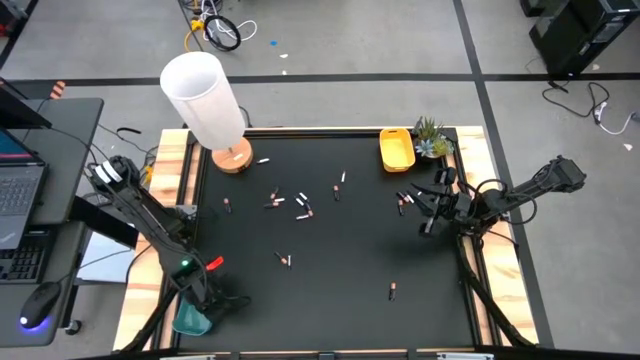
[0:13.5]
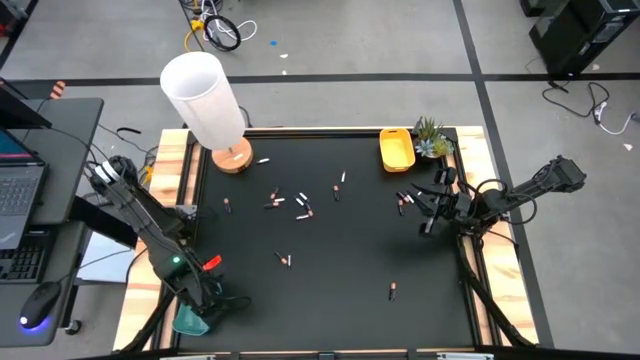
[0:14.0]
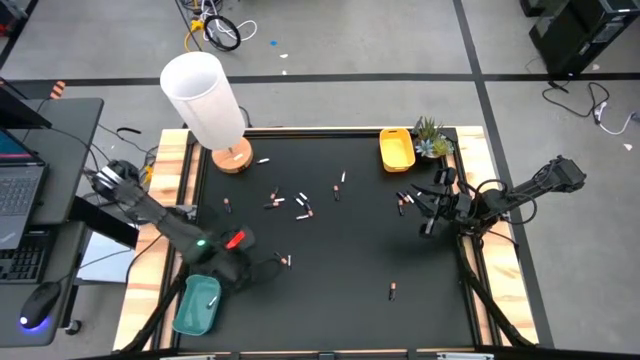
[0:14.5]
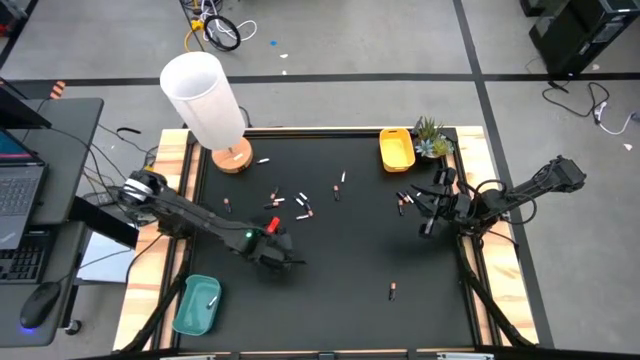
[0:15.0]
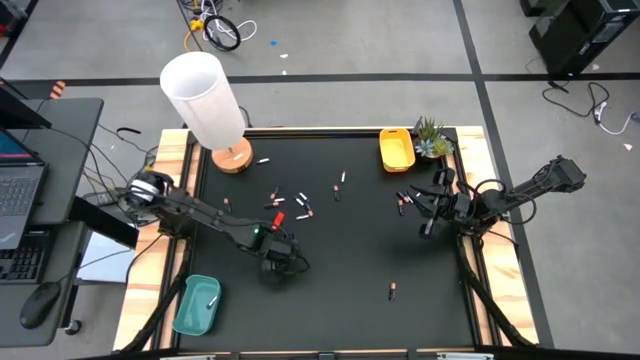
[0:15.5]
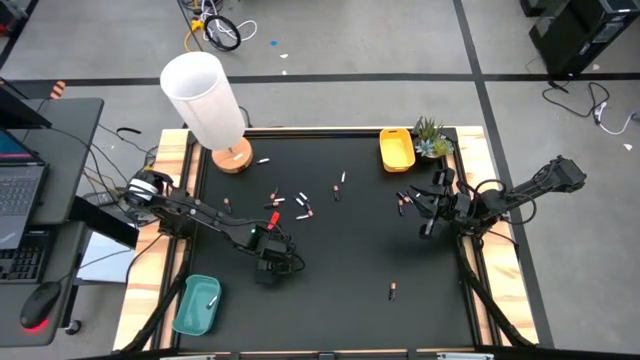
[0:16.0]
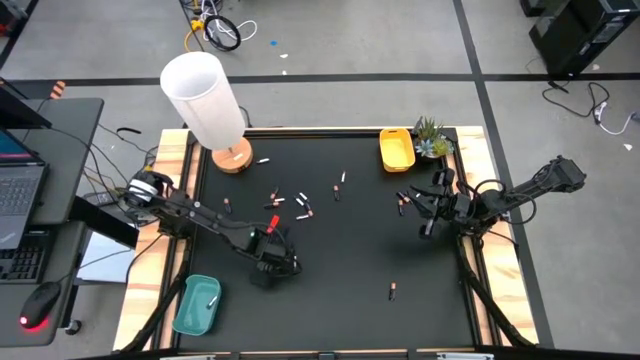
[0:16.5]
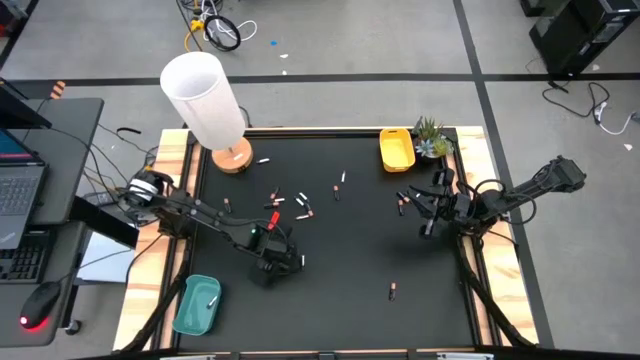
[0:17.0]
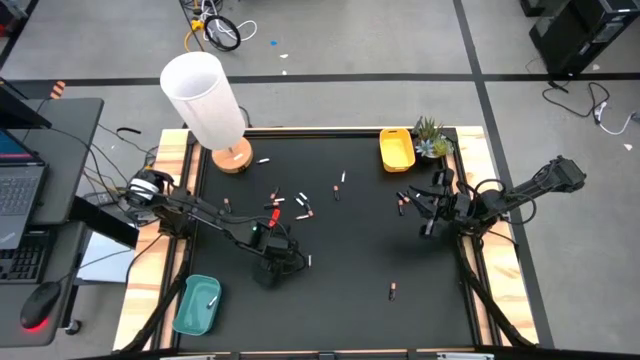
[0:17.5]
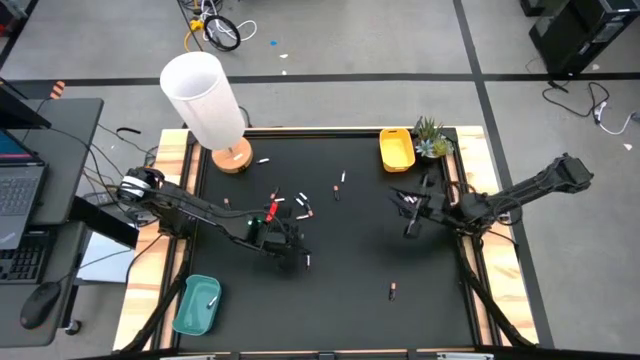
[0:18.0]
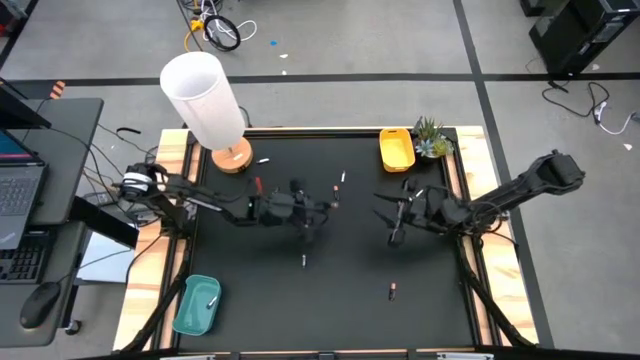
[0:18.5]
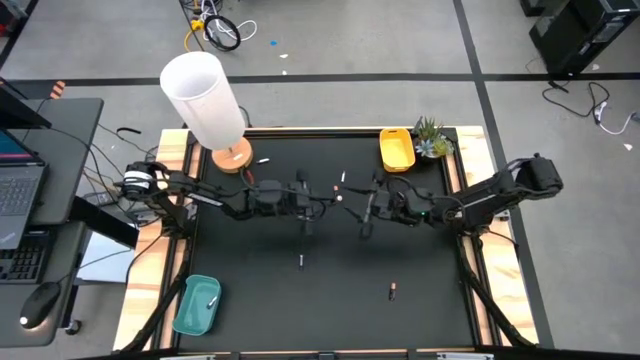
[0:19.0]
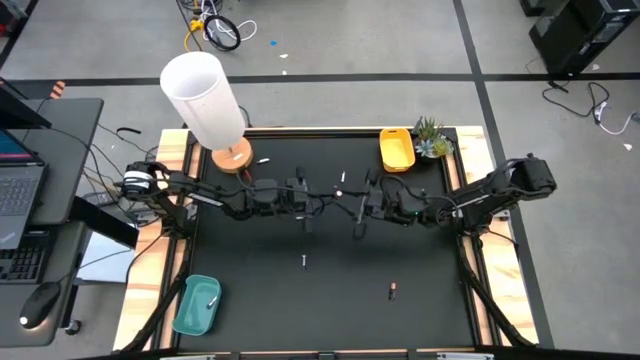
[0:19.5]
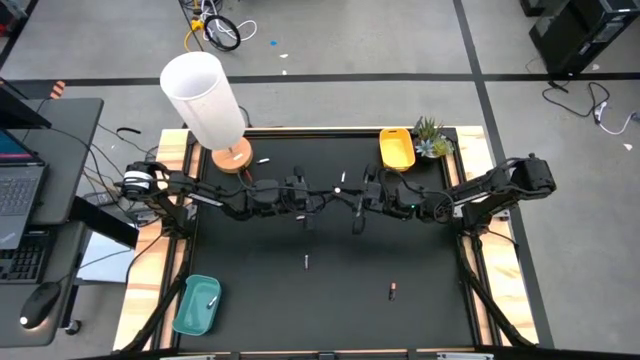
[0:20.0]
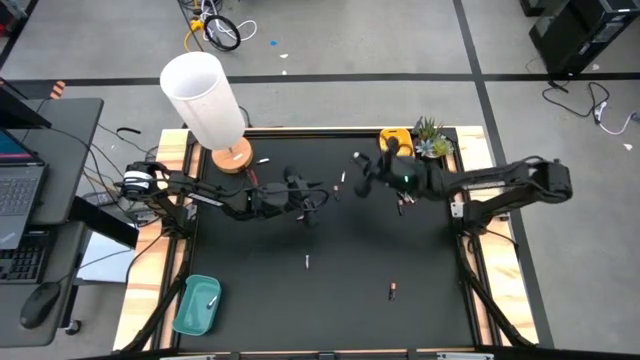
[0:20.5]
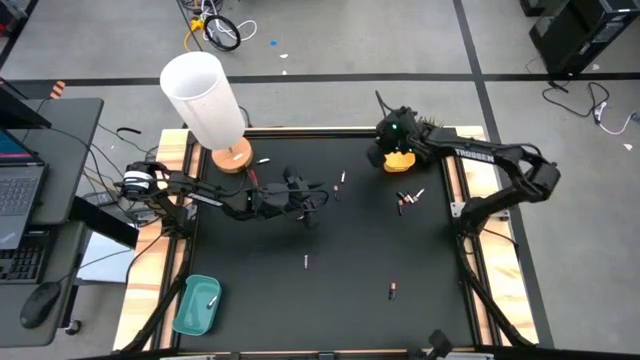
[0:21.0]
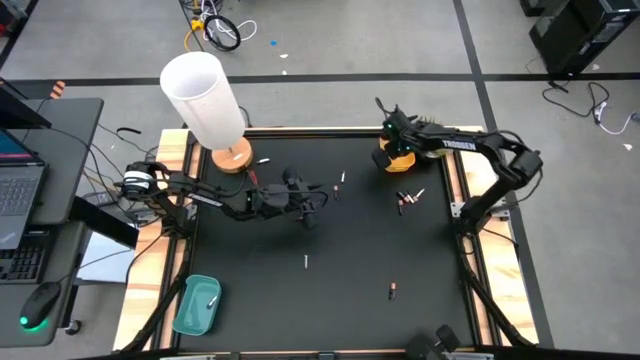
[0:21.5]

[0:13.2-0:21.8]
Task: Sort batteries
Put the black battery into the yellow bin

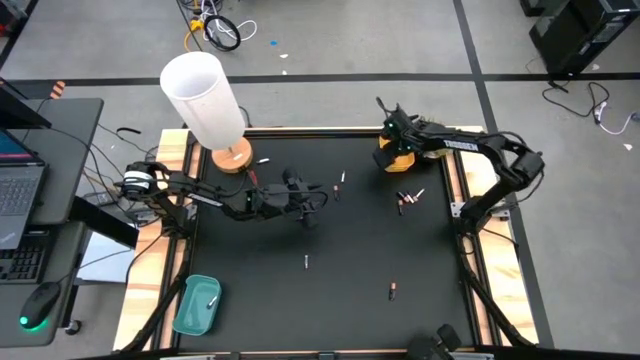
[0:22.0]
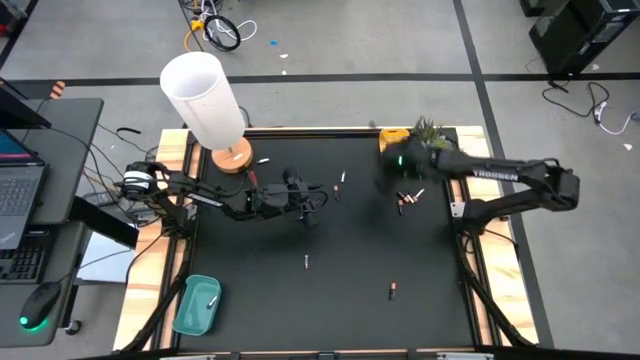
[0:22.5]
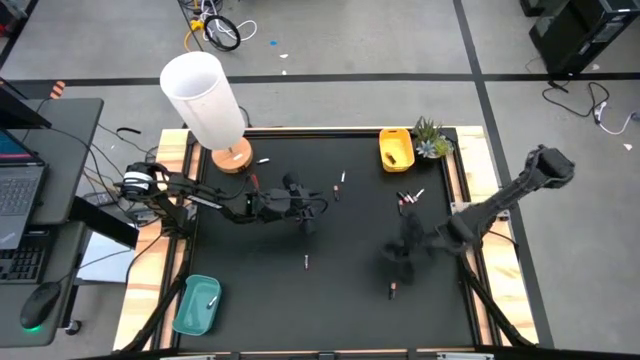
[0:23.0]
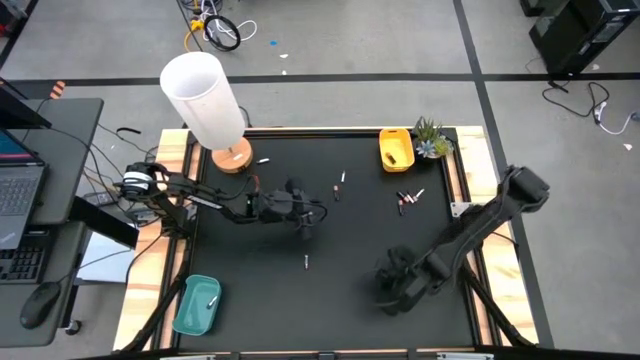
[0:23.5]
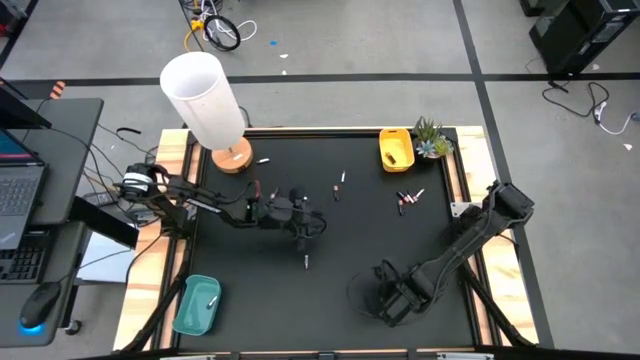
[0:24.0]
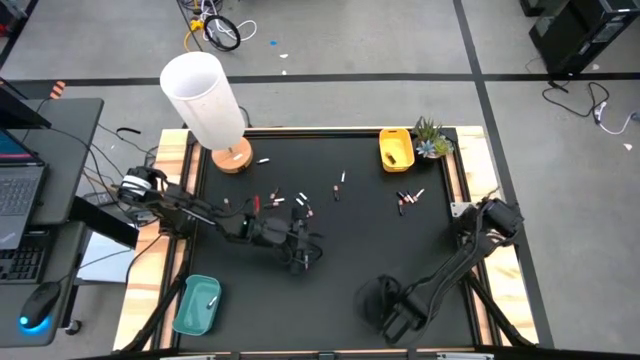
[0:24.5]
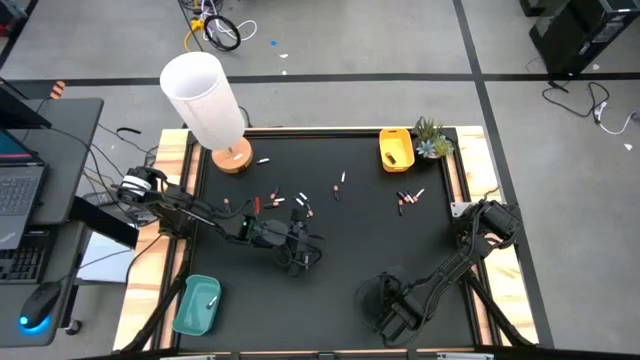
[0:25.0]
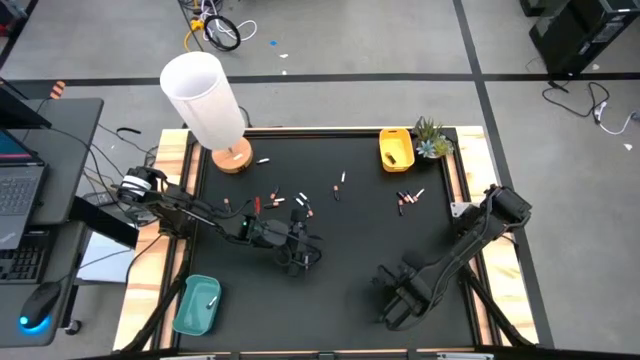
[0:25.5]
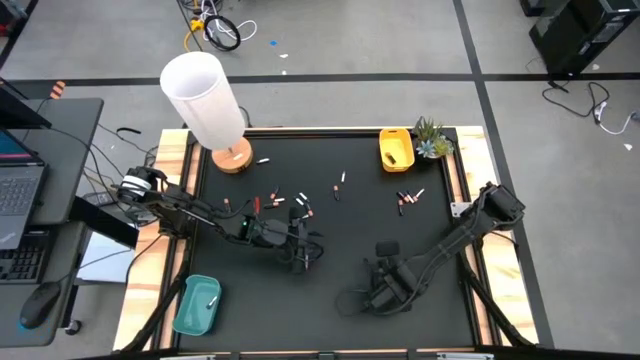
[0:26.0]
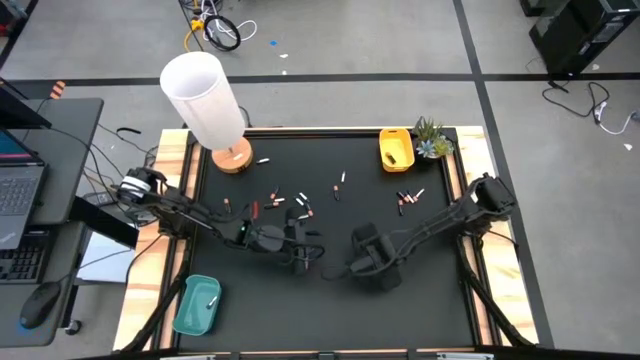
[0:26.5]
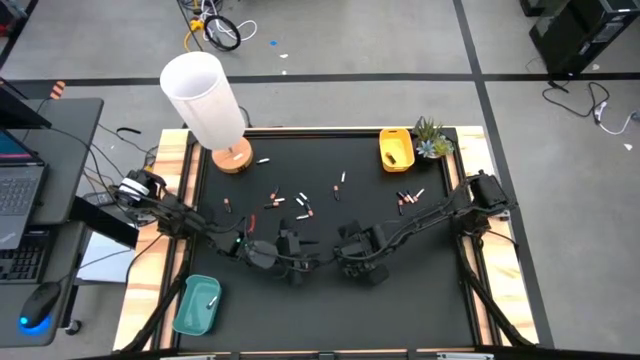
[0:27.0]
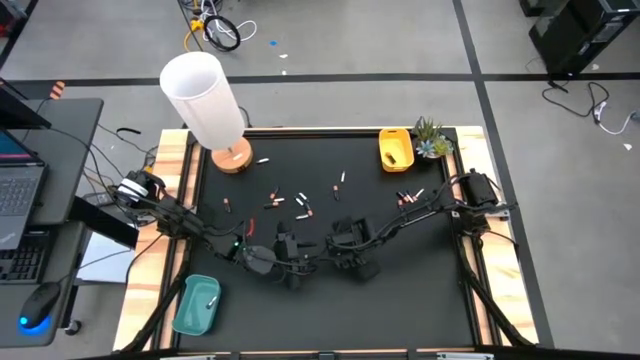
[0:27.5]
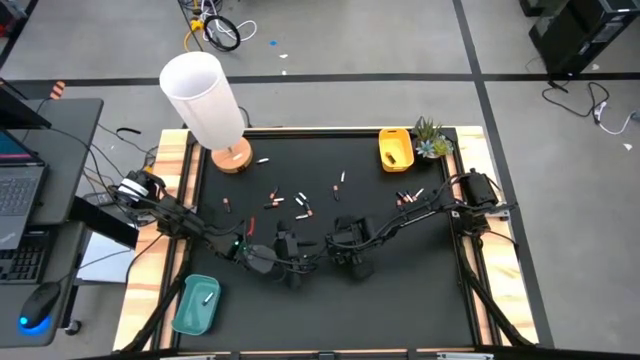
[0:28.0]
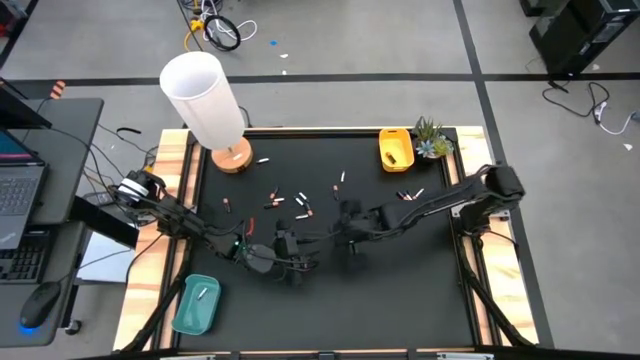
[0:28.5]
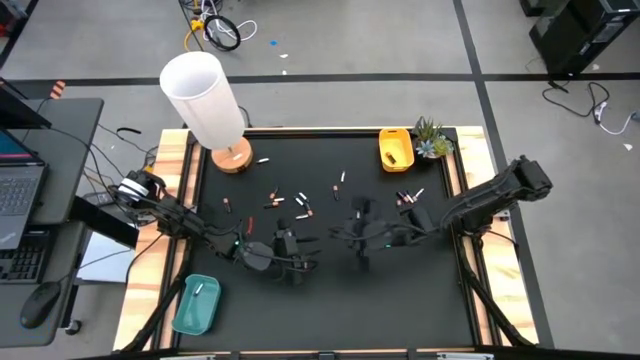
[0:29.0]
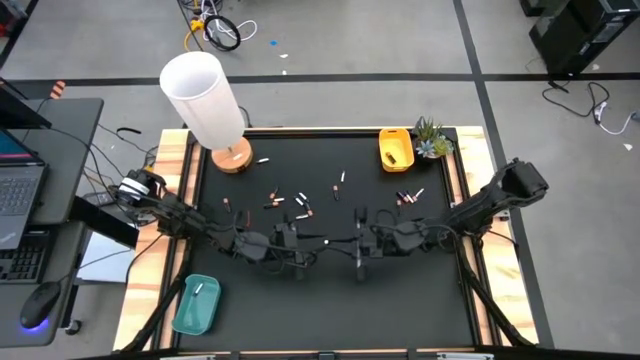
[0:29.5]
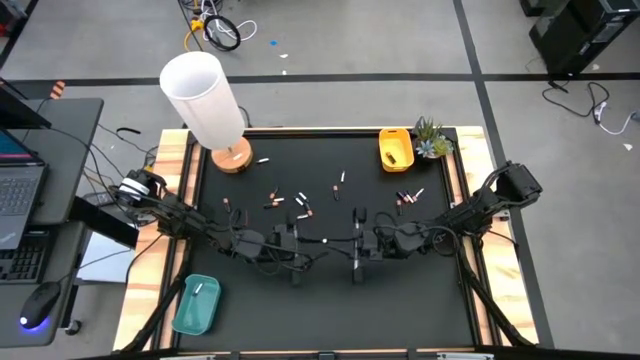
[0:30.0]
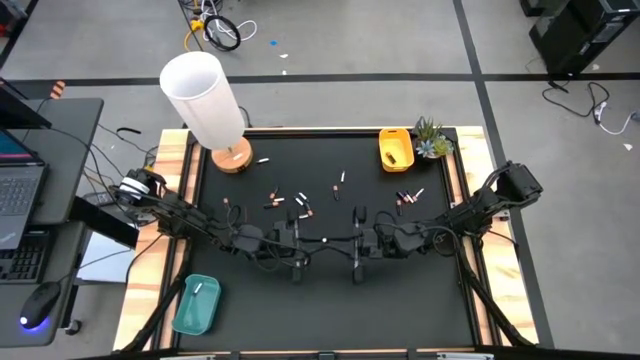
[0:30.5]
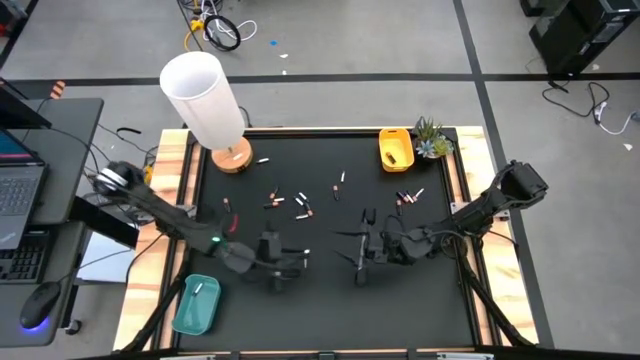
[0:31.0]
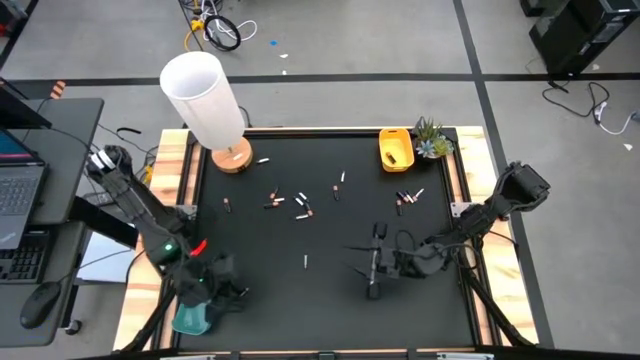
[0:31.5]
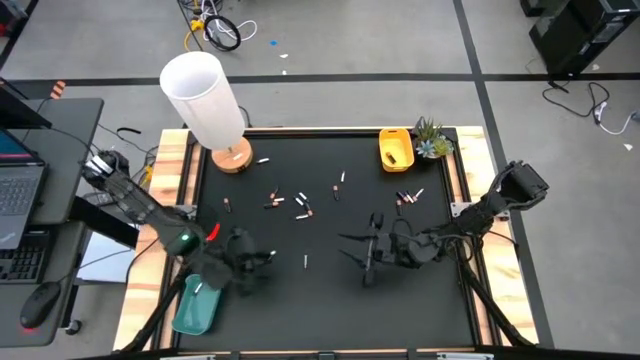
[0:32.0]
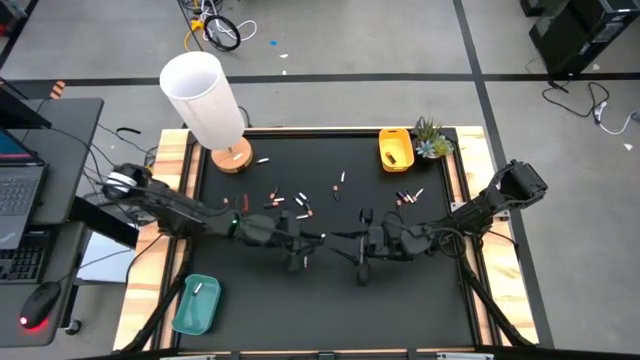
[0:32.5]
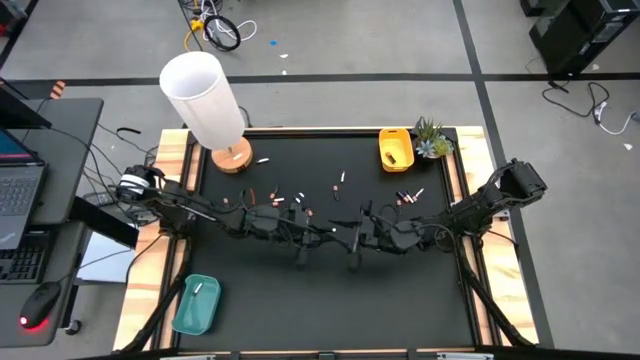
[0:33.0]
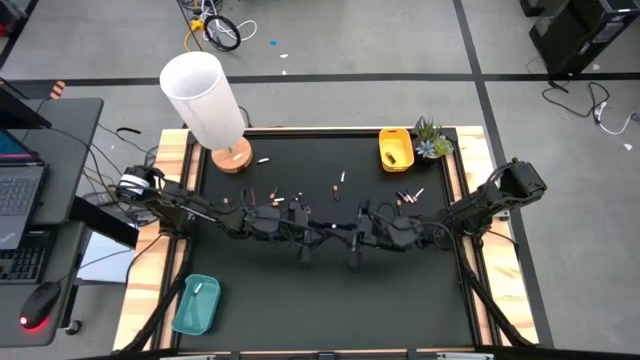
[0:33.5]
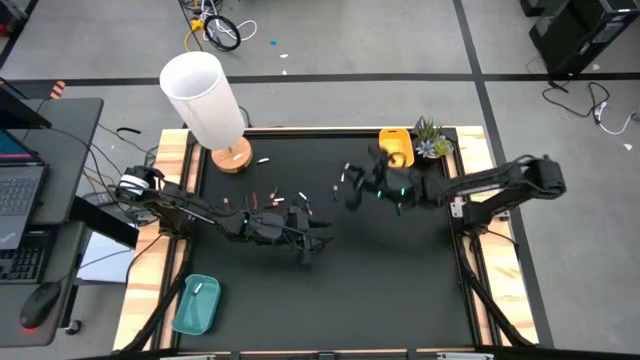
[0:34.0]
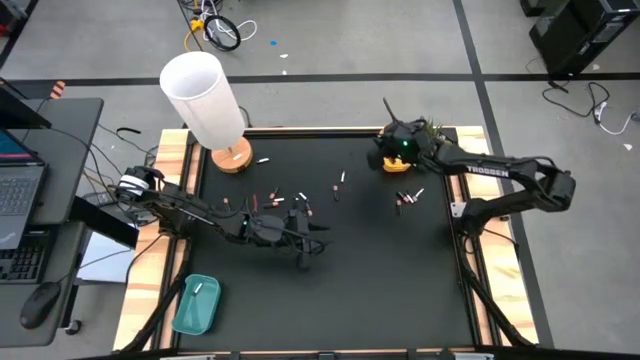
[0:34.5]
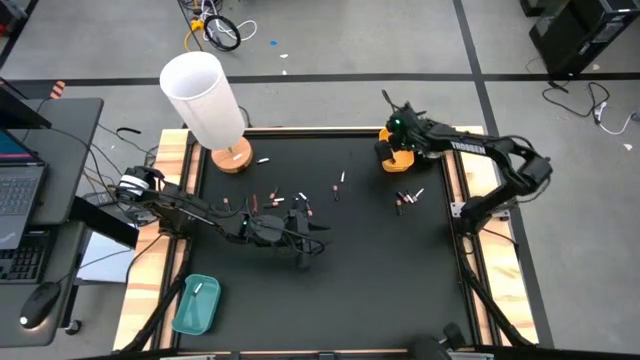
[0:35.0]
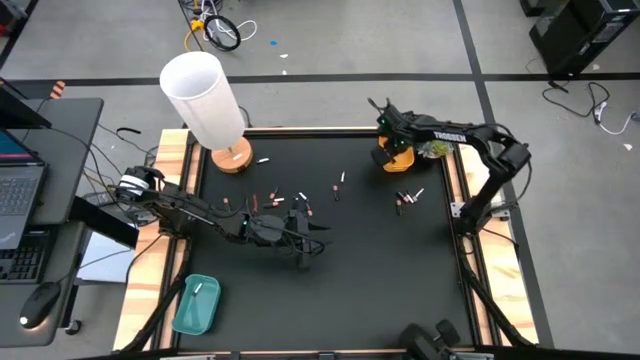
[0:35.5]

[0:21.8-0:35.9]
Put the black battery into the yellow bin
